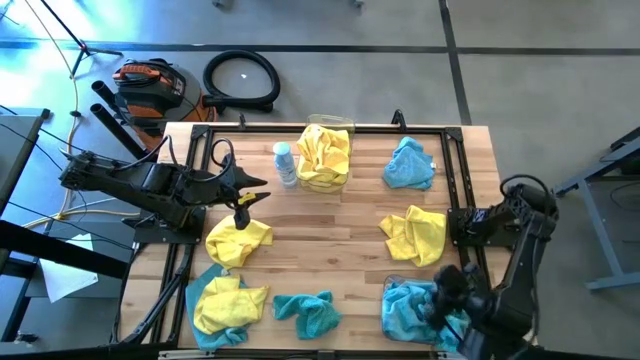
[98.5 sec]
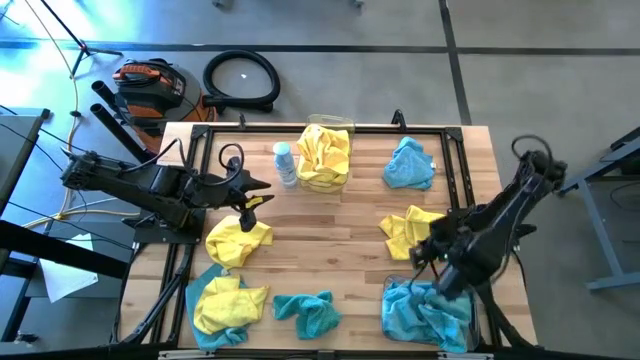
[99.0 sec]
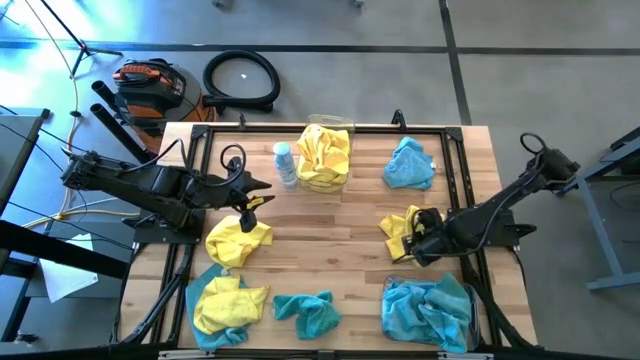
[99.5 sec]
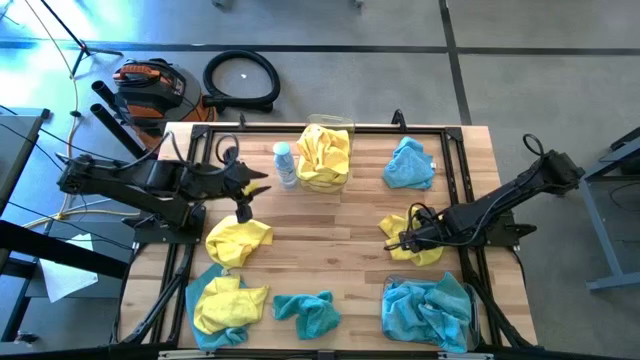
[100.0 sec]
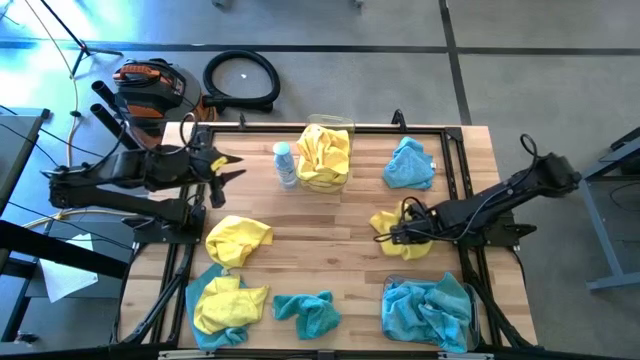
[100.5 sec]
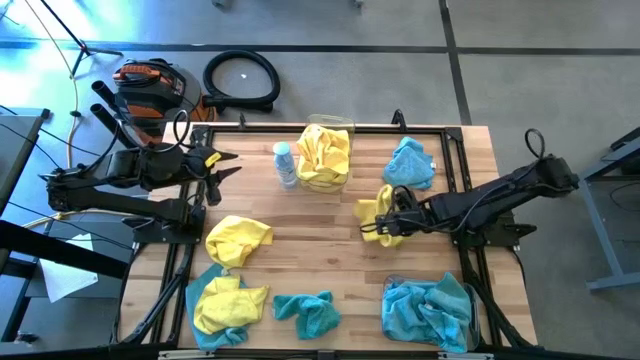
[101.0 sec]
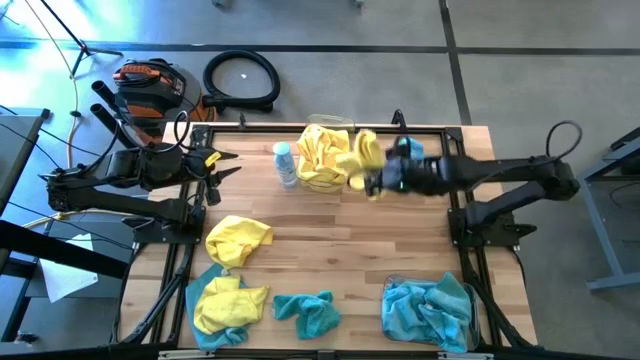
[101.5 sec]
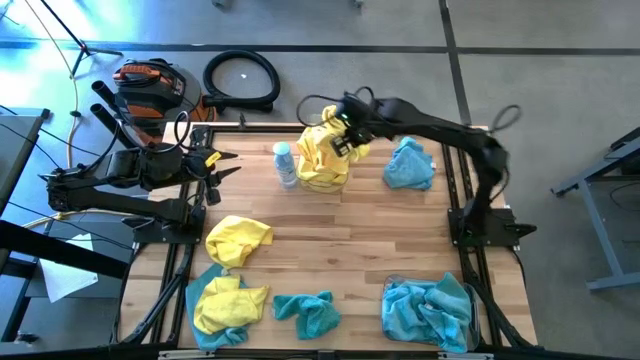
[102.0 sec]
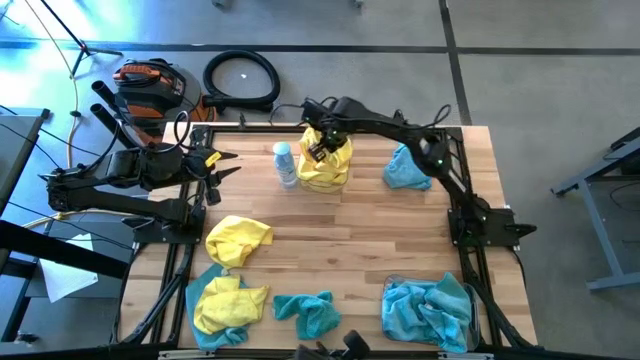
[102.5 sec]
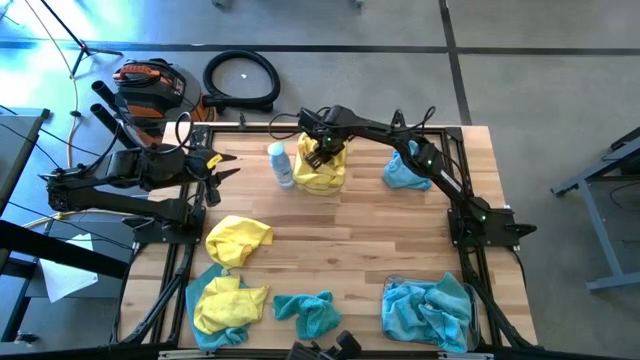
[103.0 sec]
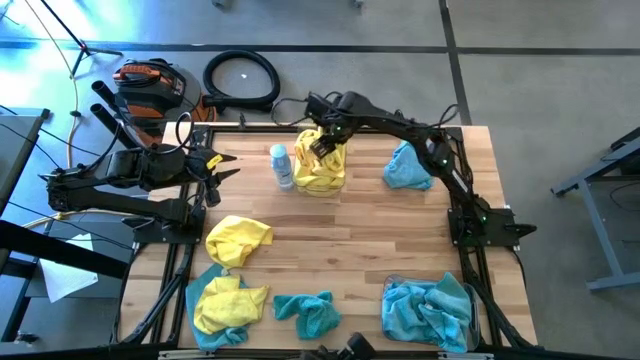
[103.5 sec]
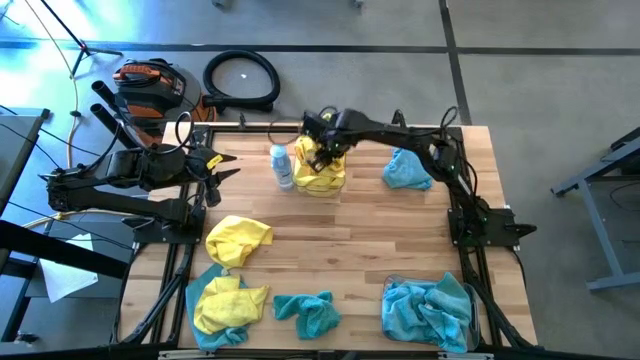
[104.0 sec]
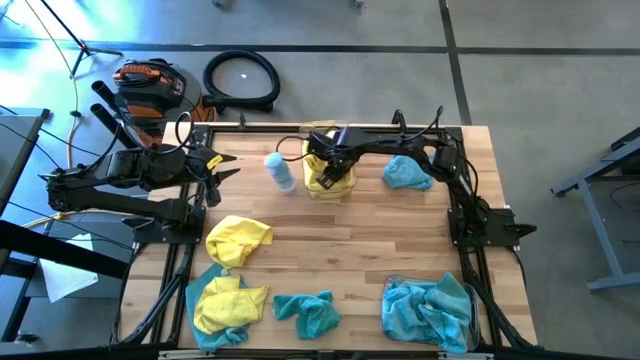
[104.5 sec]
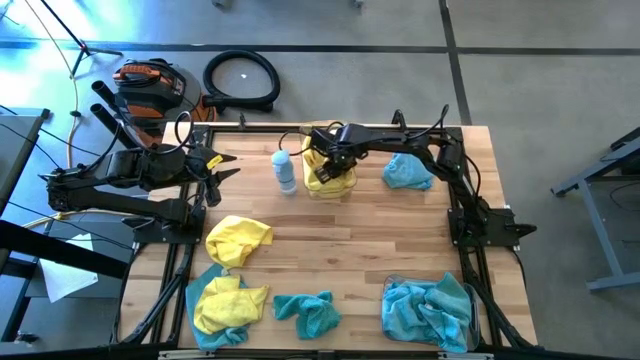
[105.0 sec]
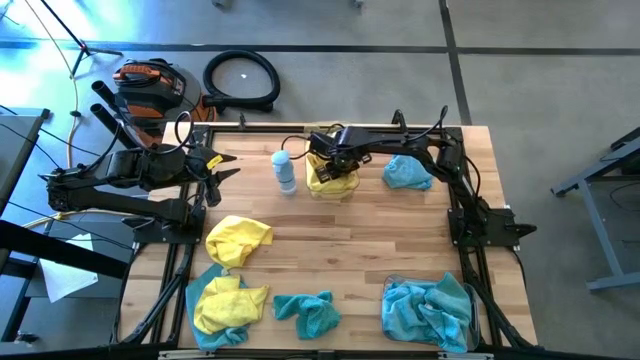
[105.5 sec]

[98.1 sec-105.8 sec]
Task: Sort microfiber towel by color & place in baskets
Put the yellow towel into the top transparent bin

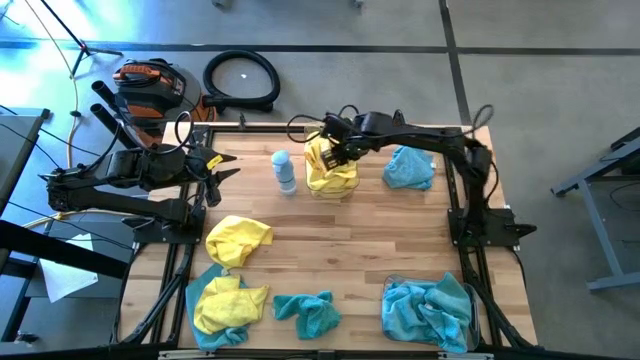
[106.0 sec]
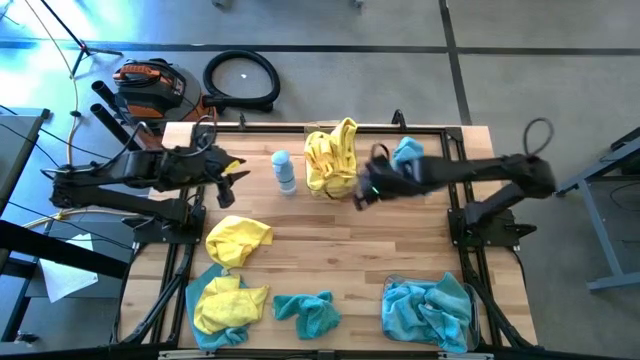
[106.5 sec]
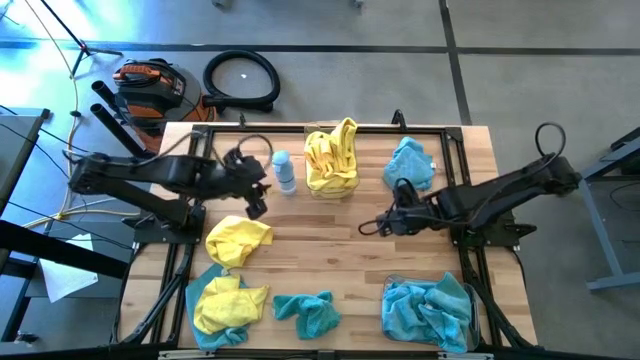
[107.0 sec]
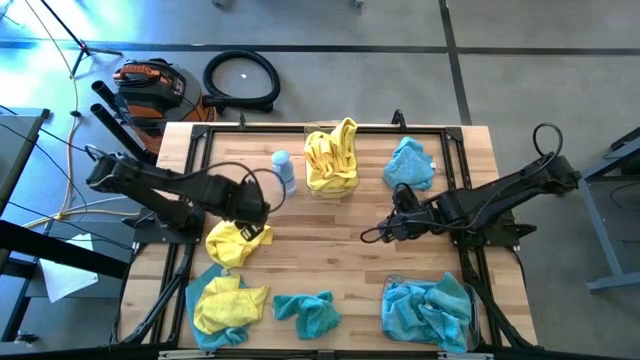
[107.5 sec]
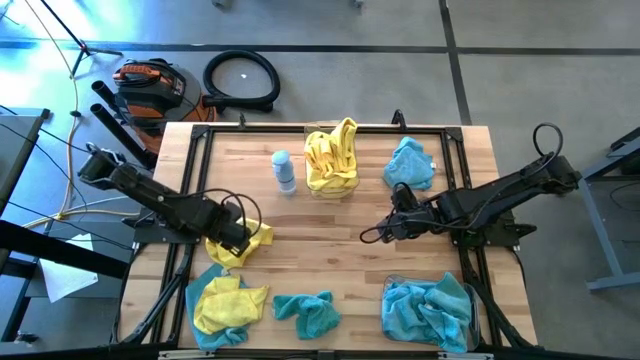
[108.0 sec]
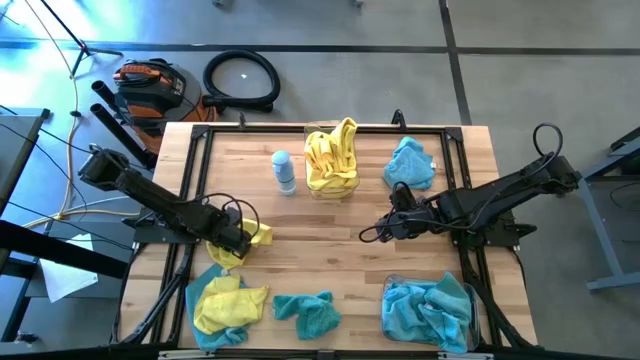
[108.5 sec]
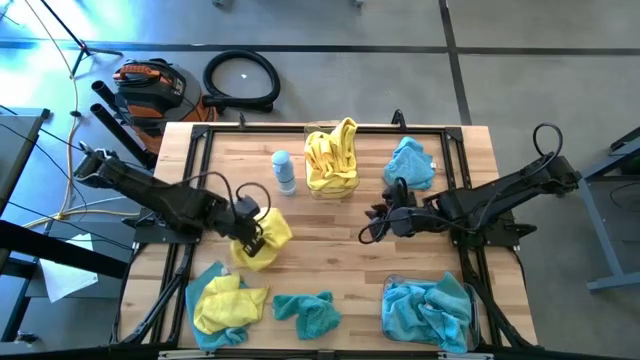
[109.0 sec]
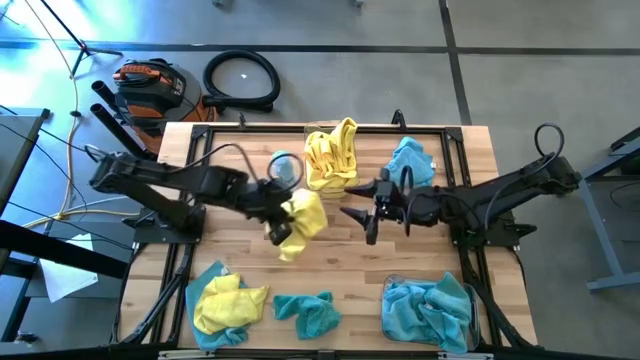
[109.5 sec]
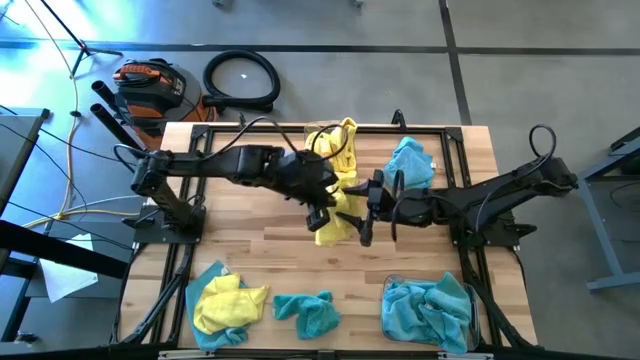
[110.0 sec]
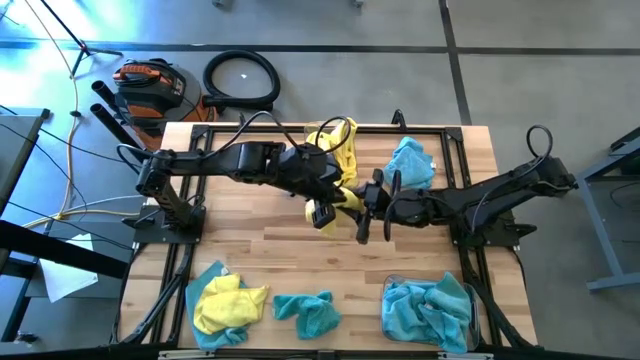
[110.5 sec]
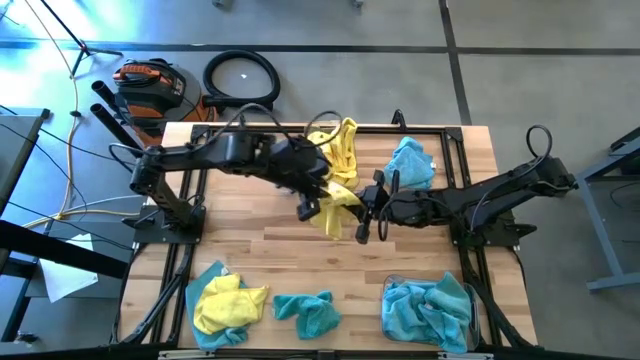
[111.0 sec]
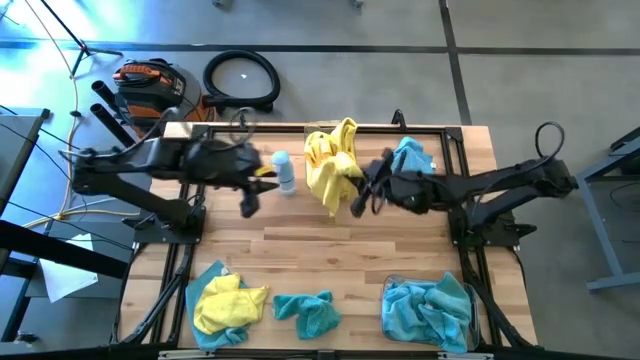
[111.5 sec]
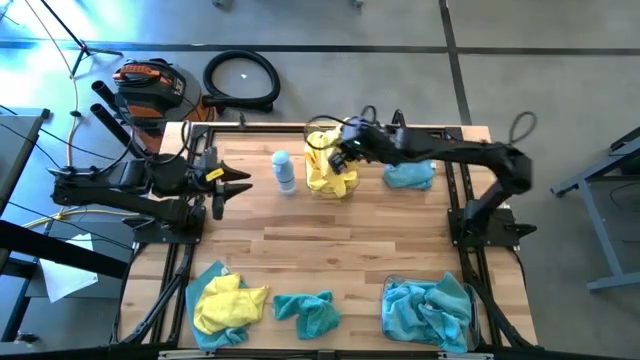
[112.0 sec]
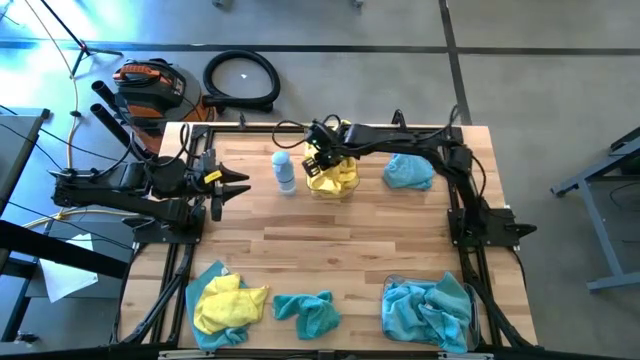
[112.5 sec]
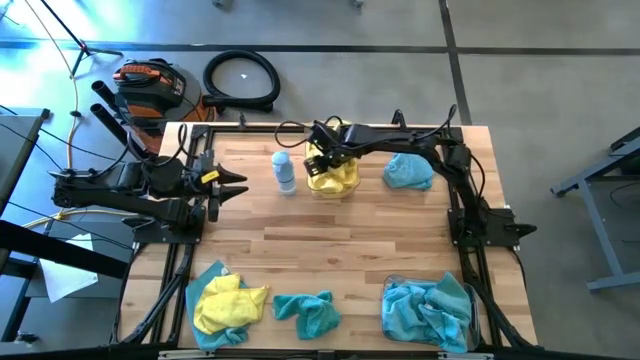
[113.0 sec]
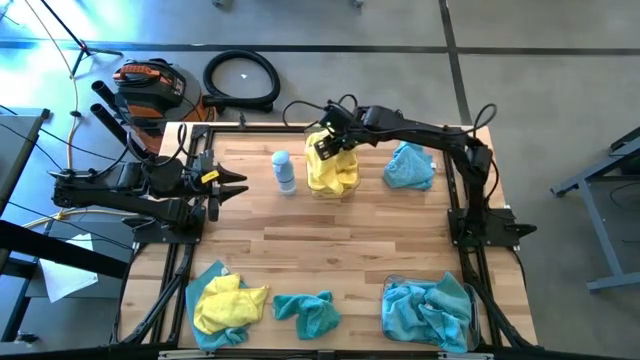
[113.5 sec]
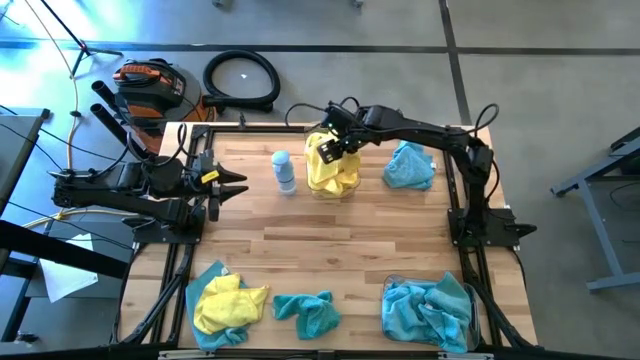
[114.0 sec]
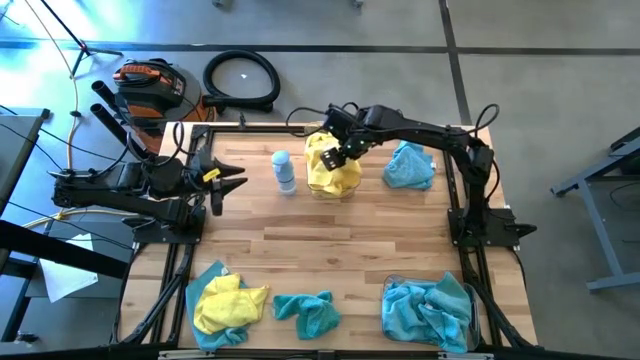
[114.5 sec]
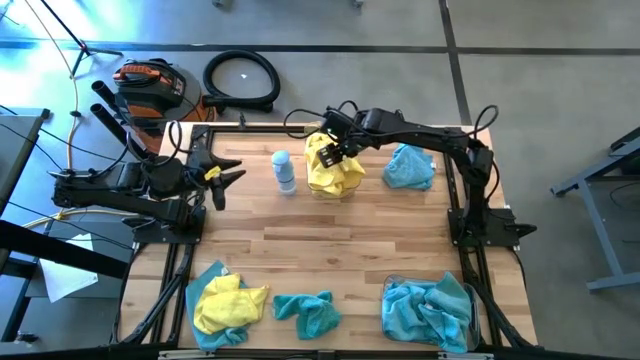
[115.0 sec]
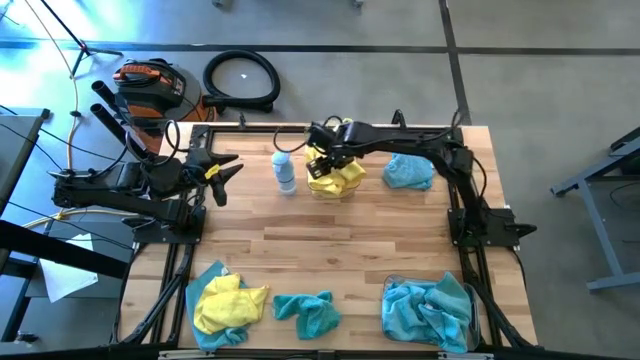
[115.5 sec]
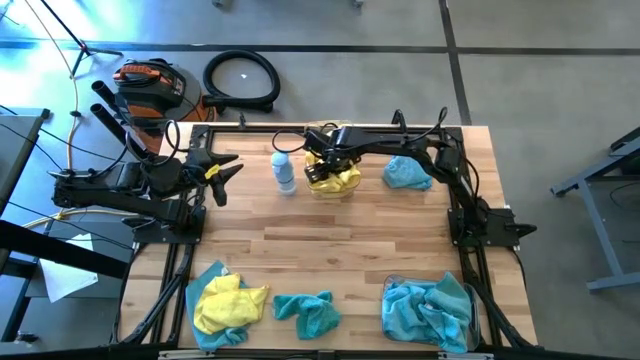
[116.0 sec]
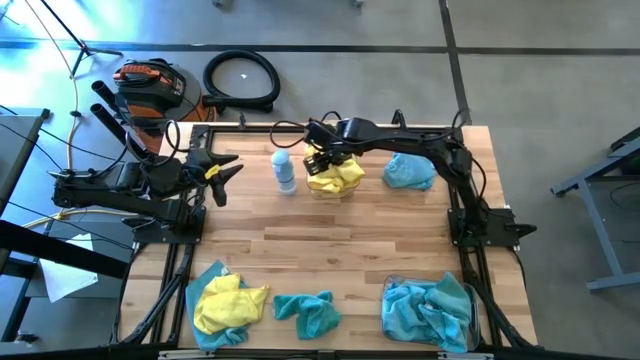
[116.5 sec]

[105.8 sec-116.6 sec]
Put the yellow towel into the top transparent bin
